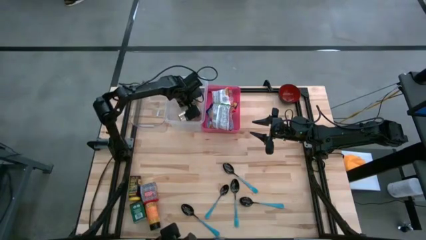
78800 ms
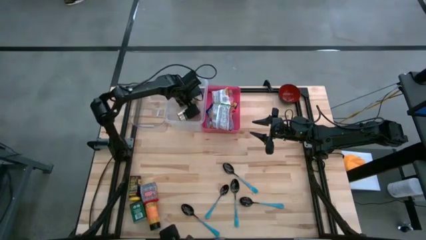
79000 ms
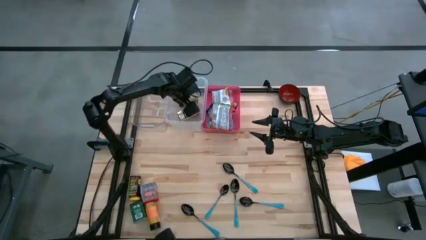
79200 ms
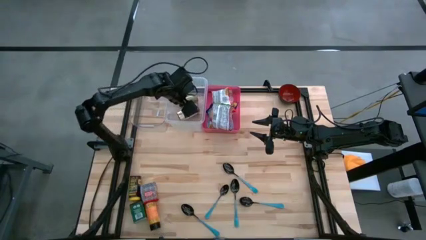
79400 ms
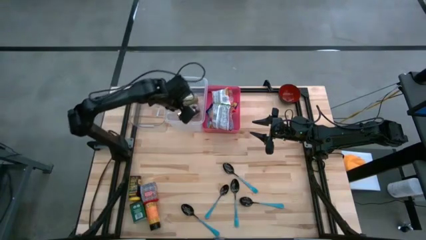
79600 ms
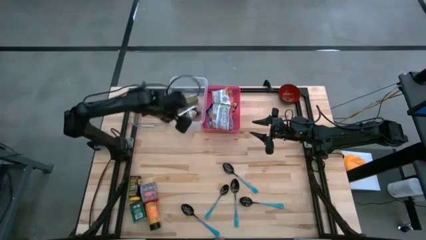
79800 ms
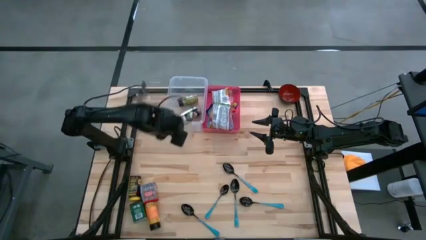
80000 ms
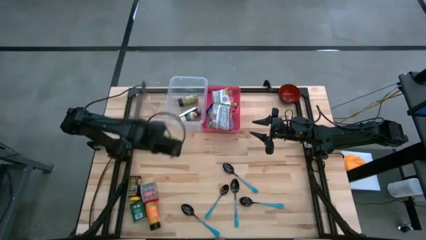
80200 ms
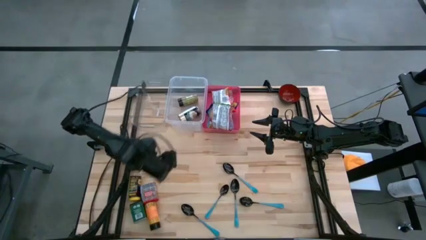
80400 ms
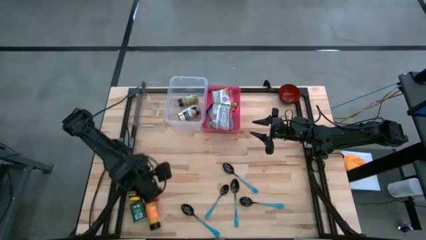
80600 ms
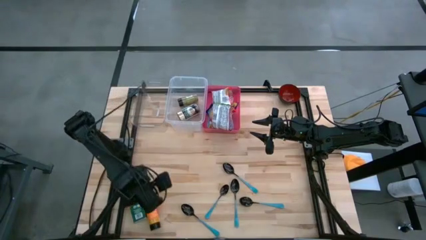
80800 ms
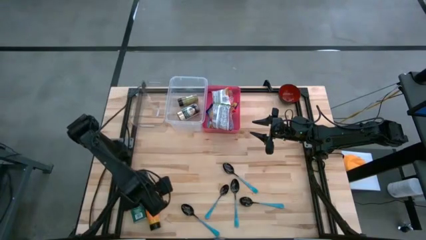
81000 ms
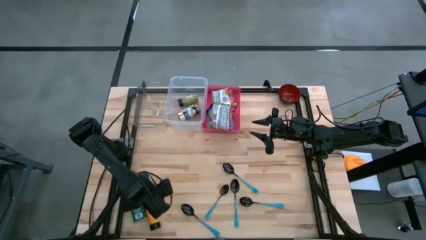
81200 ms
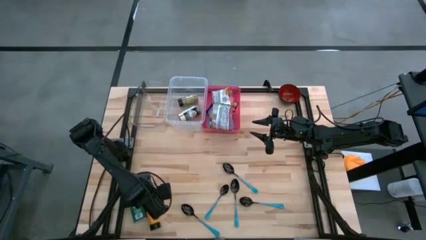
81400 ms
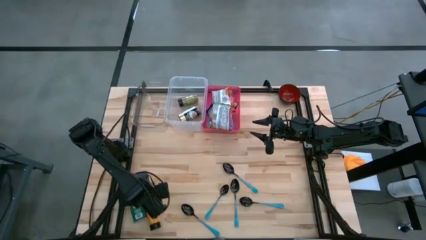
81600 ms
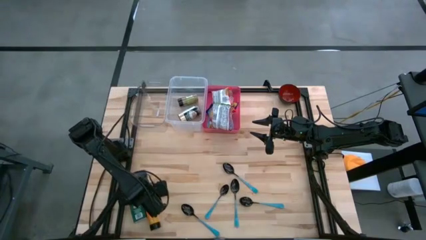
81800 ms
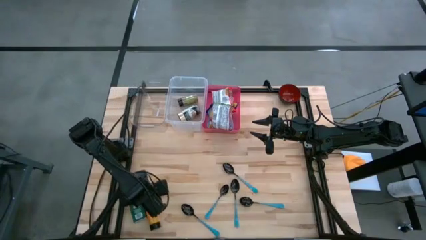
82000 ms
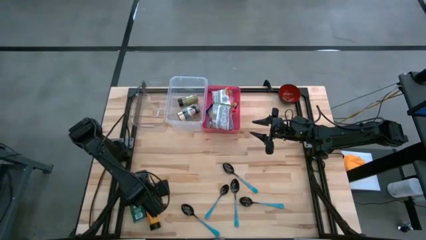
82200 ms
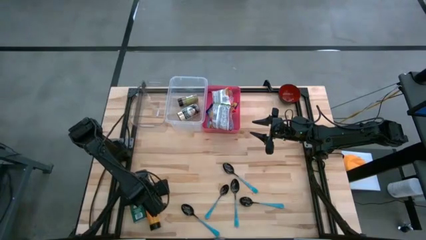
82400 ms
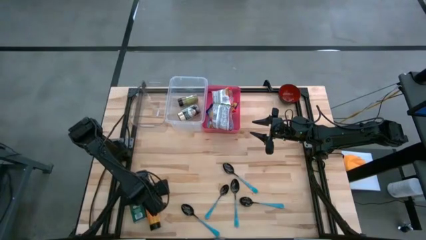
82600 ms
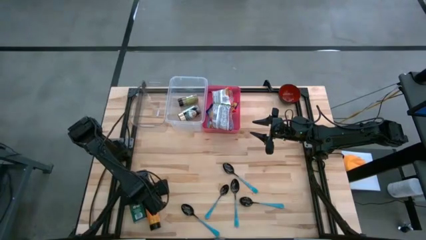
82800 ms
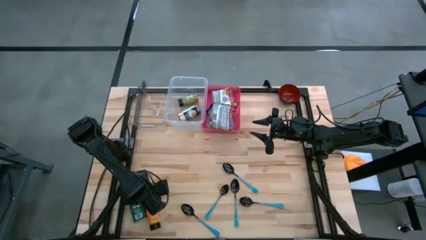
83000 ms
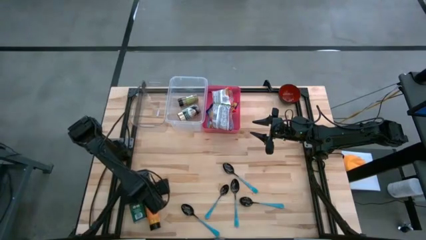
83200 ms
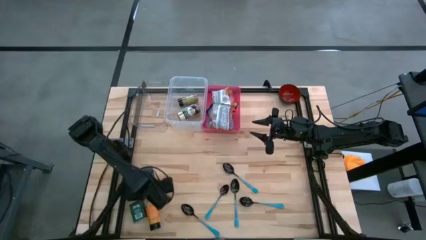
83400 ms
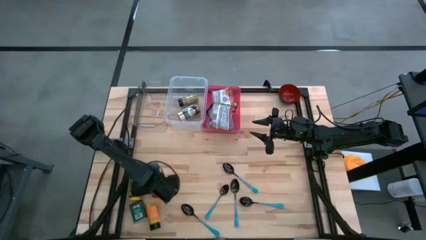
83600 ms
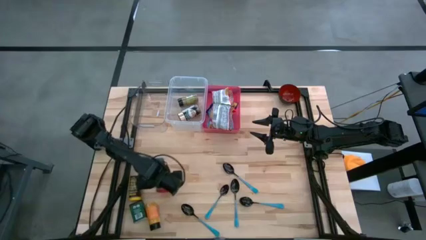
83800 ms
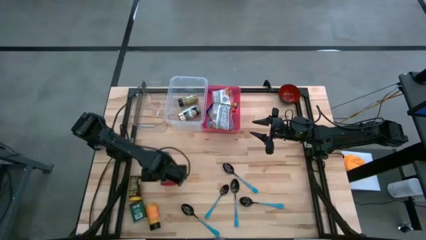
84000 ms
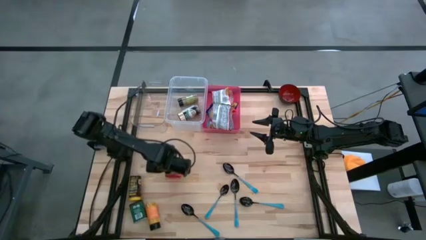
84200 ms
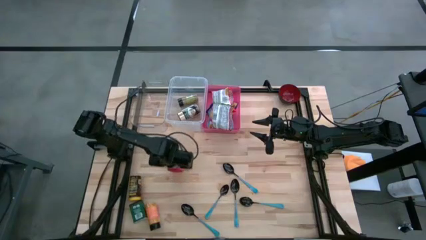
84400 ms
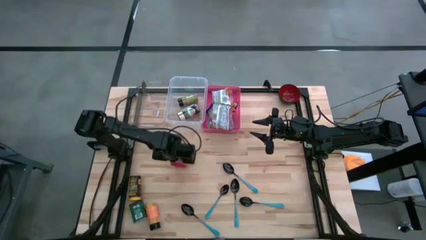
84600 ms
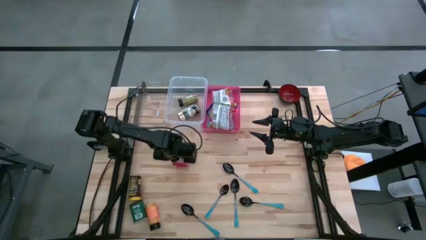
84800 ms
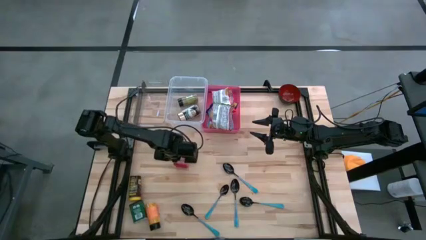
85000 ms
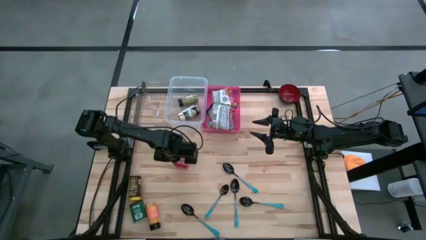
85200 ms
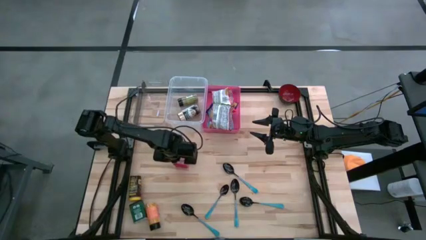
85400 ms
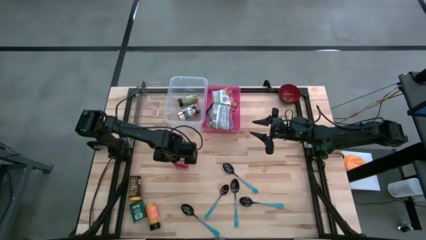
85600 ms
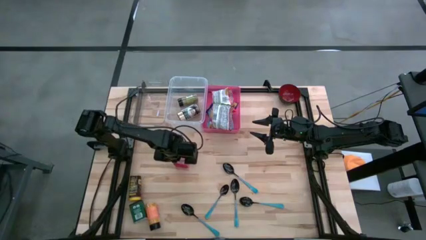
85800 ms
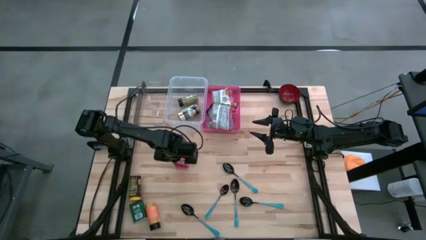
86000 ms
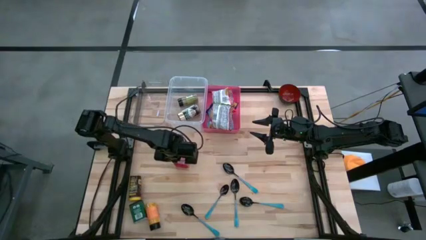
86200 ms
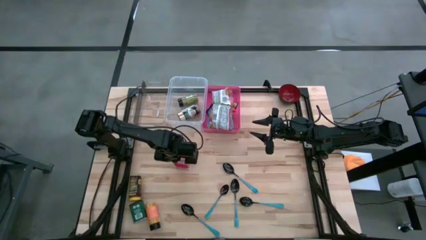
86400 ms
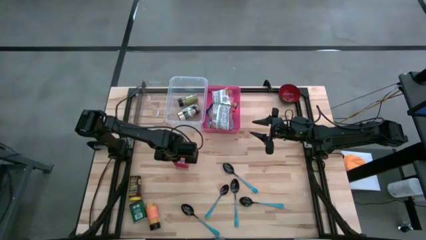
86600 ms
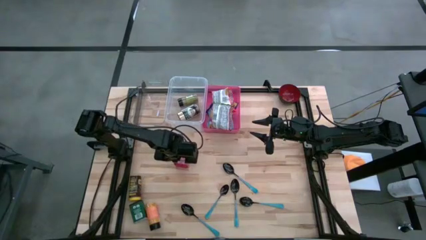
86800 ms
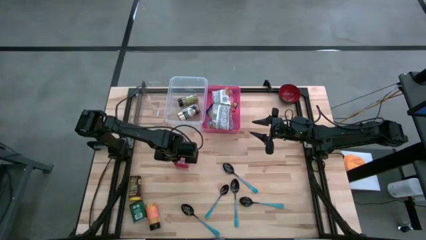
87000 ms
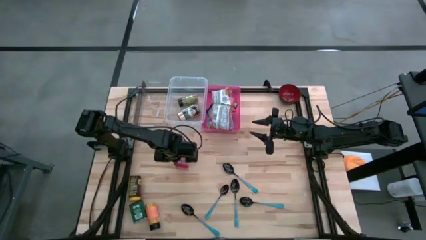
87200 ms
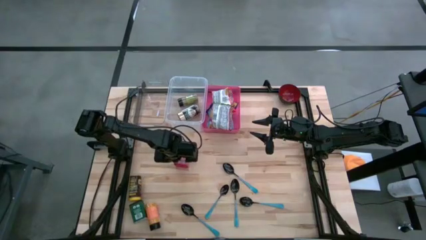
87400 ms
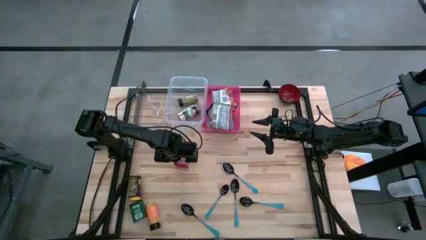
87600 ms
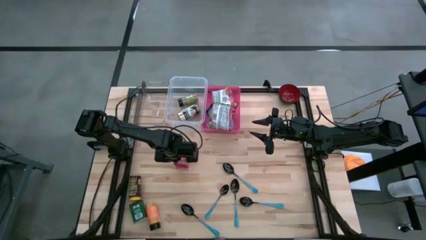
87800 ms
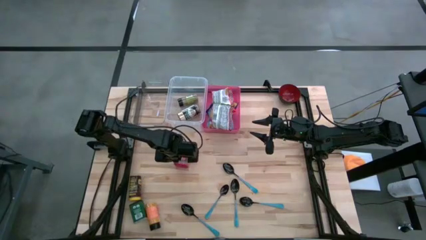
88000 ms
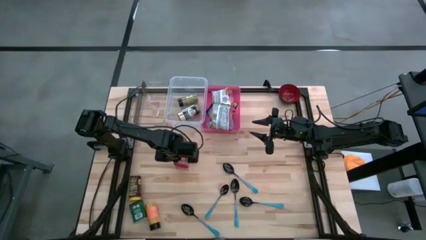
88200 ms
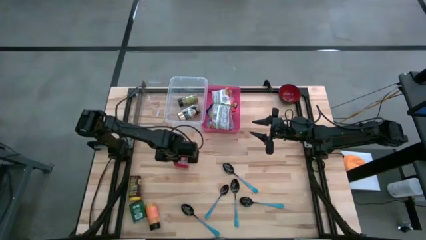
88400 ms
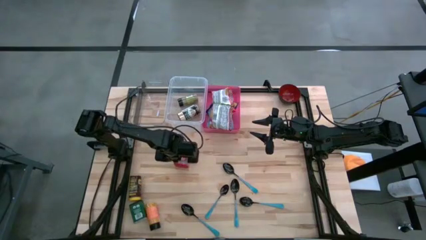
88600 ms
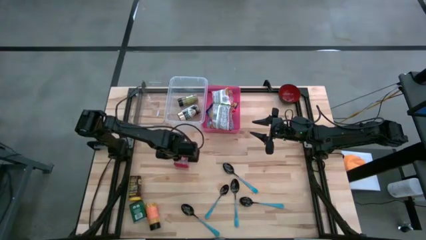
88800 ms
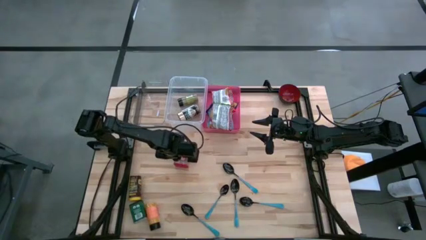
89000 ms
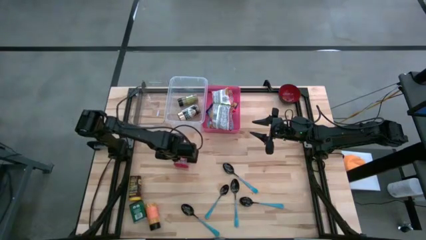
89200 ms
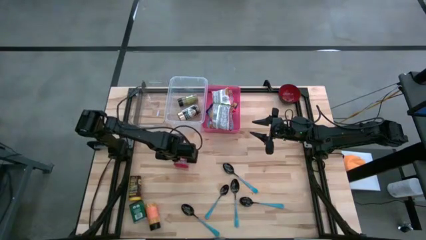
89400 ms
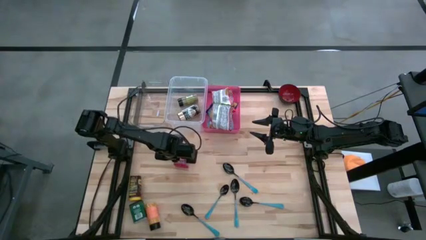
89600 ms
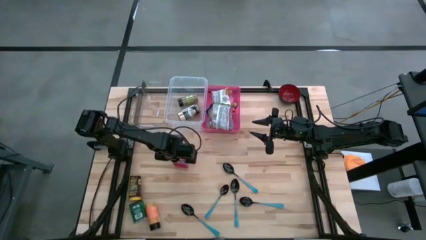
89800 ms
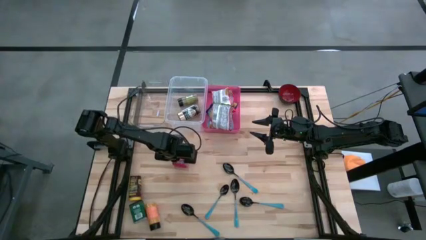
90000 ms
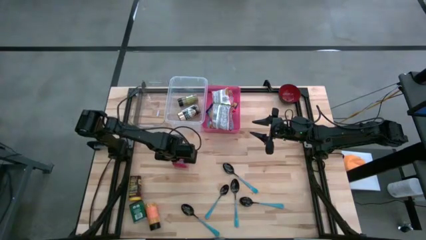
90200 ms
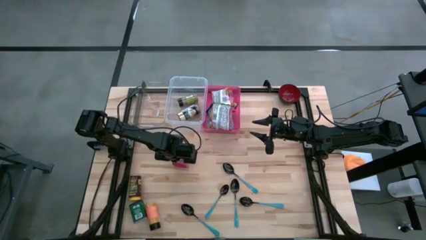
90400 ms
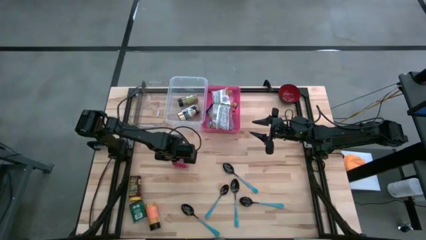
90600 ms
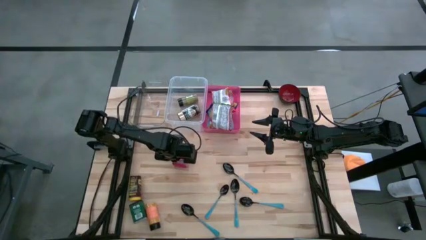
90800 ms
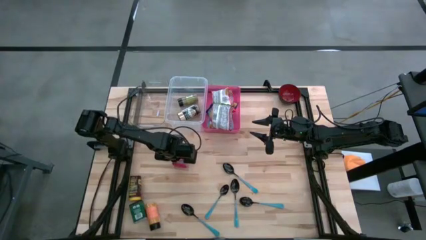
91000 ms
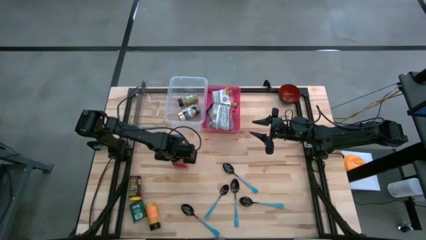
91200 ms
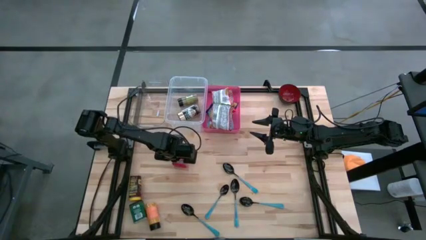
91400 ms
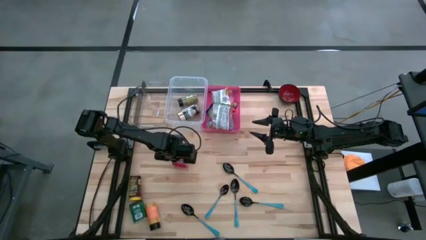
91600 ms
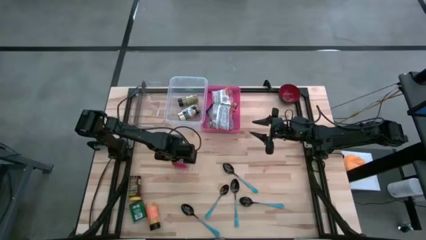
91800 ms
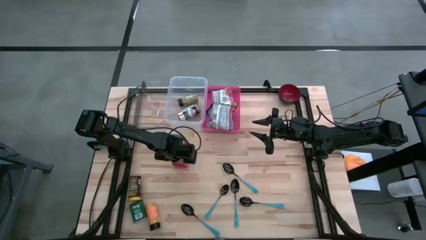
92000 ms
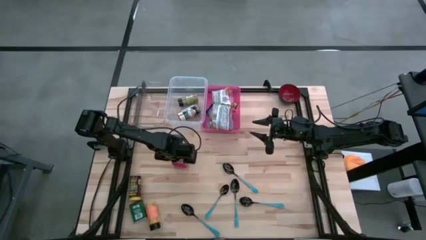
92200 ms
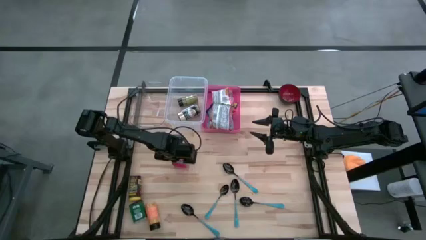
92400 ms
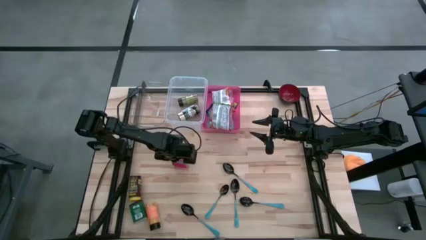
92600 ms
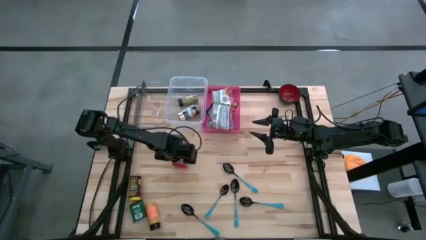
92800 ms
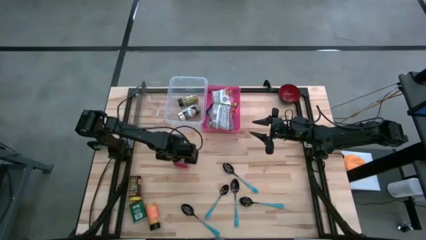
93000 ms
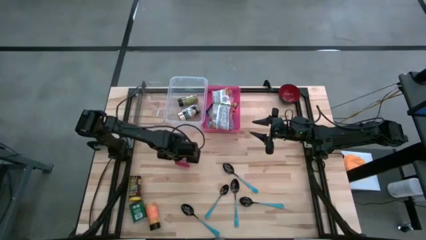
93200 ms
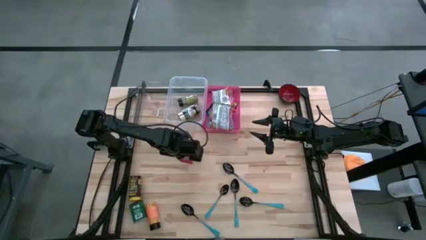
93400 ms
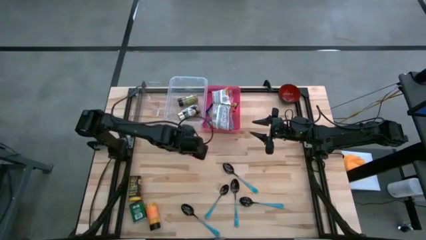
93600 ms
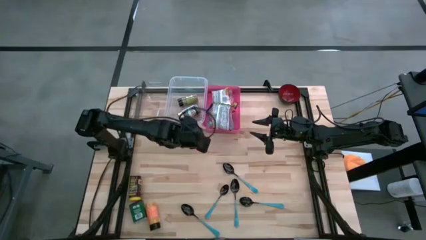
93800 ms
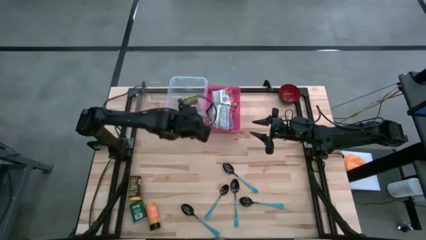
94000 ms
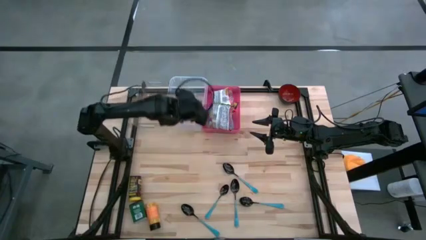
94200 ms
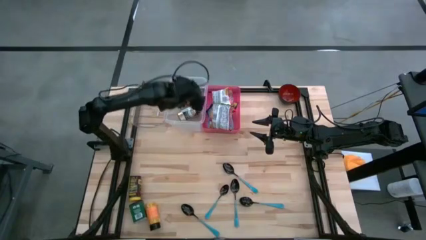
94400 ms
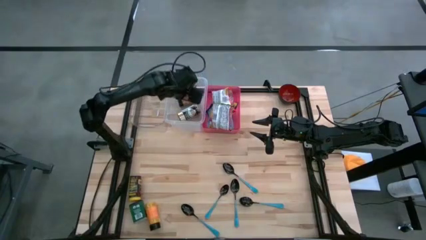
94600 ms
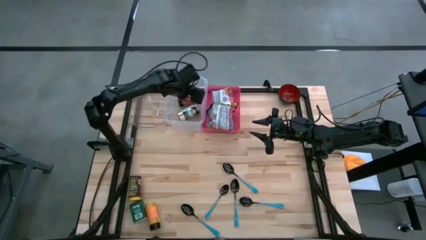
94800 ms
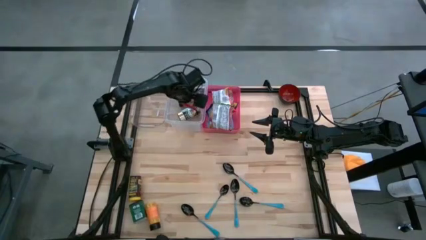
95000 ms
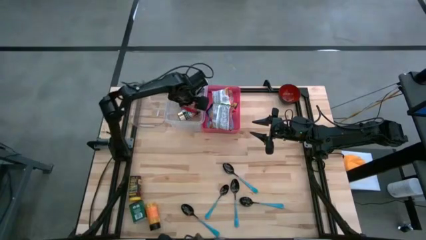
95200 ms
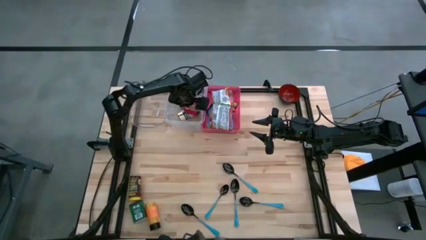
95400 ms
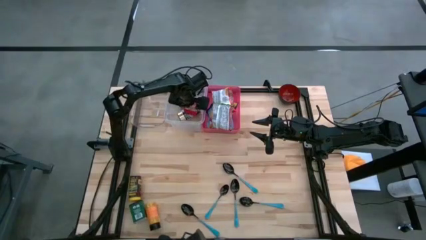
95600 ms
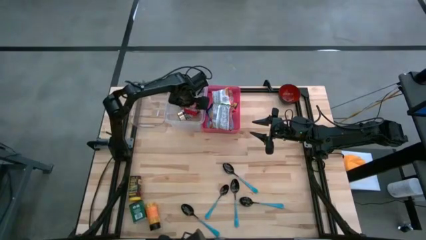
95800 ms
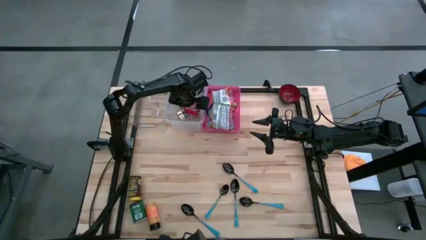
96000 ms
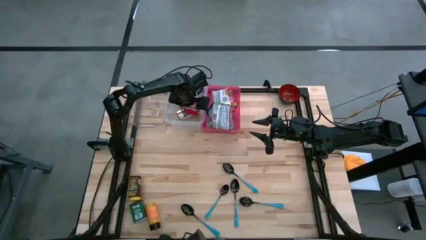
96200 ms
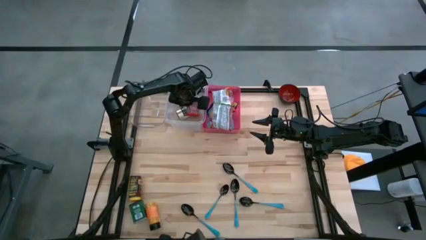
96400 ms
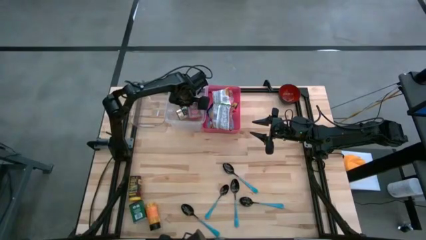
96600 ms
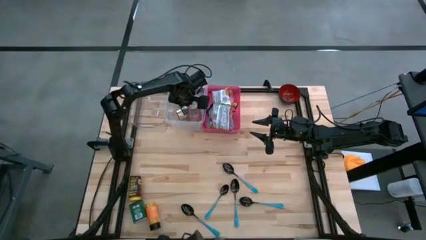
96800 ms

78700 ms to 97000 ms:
Put the red seasoning can into the right transparent bin
